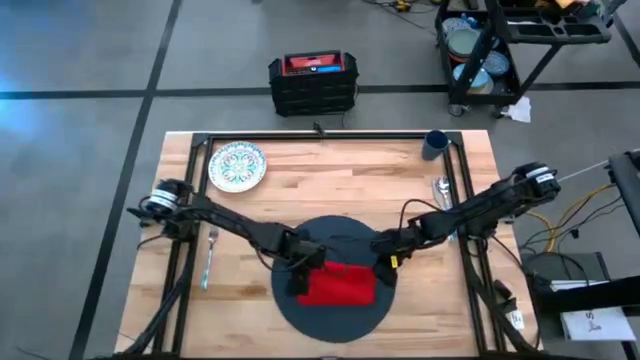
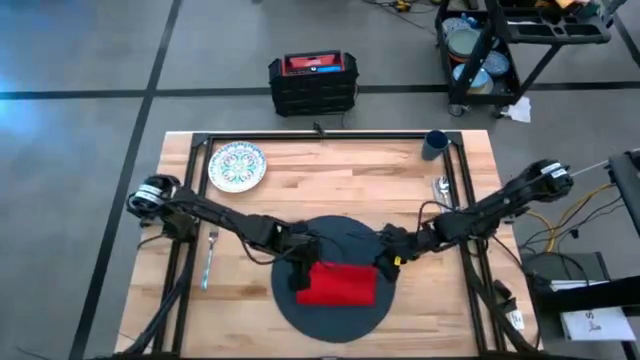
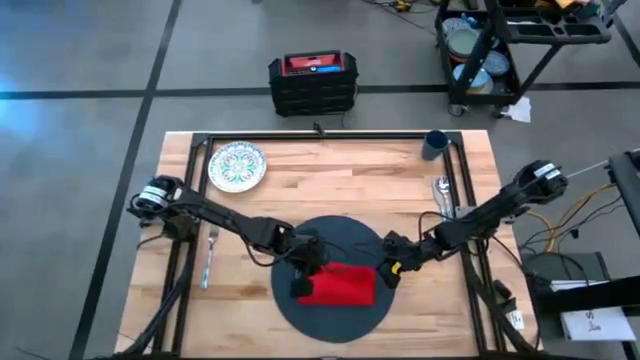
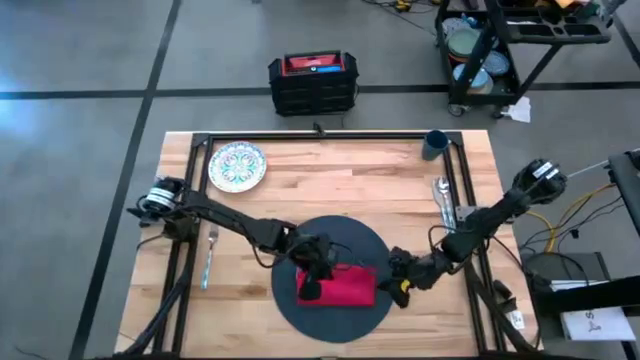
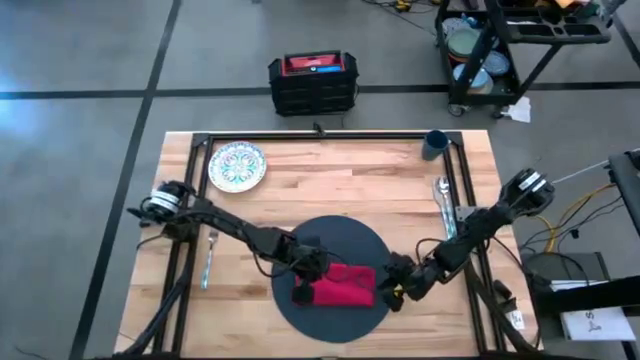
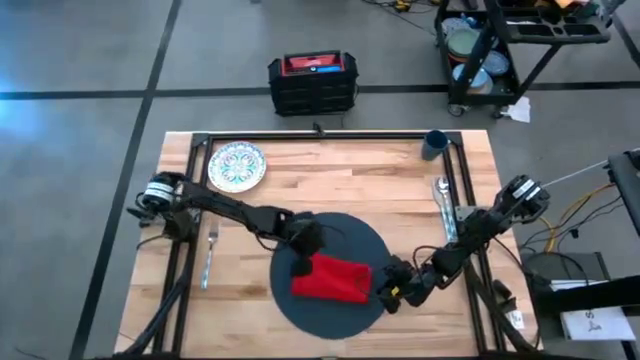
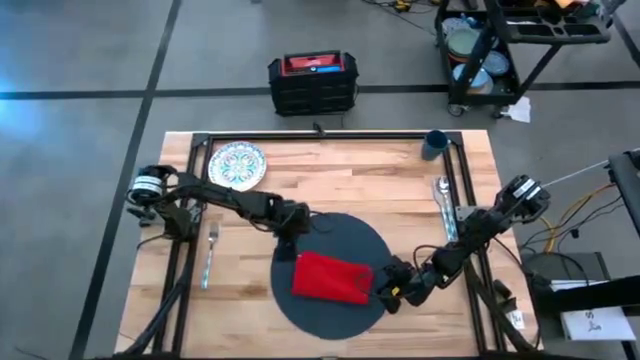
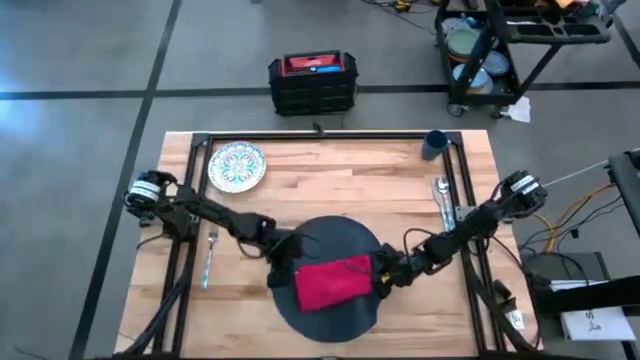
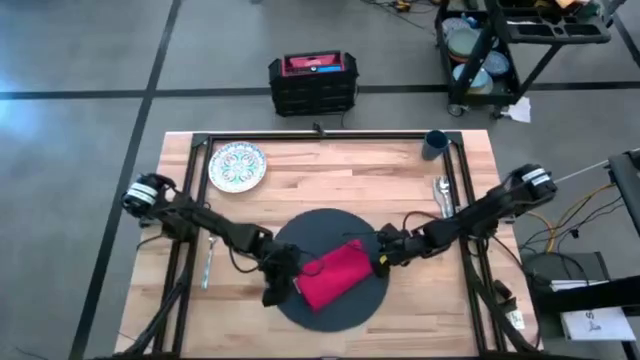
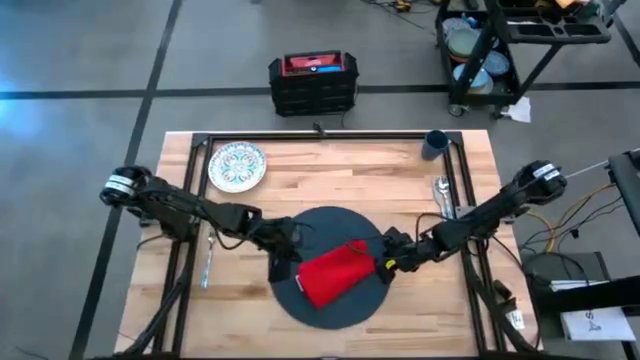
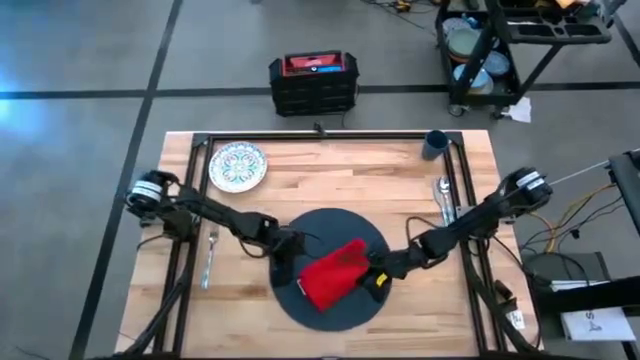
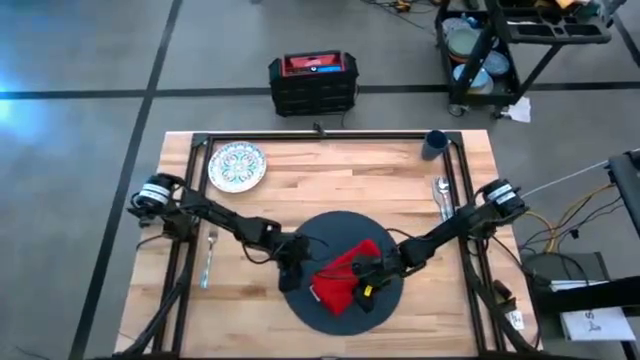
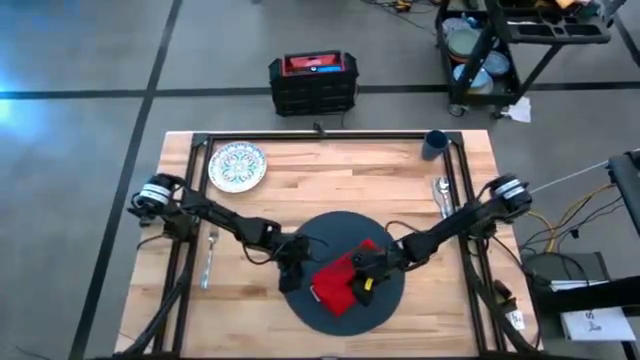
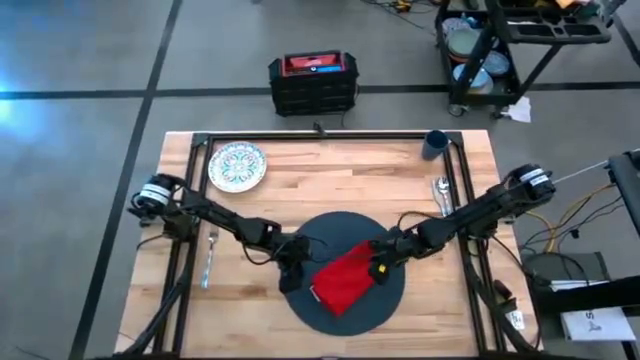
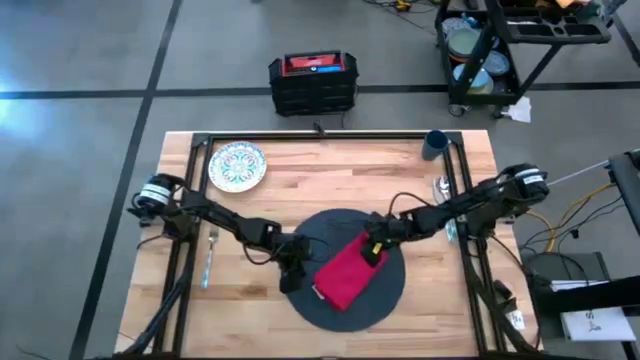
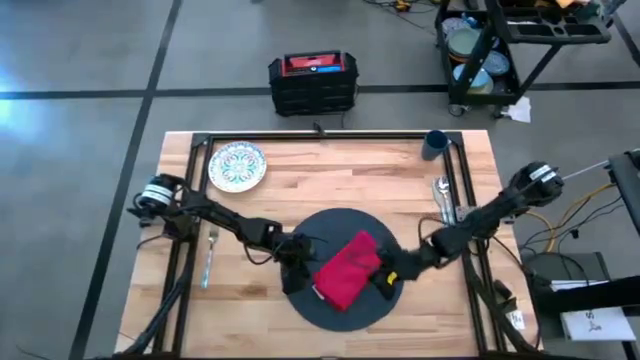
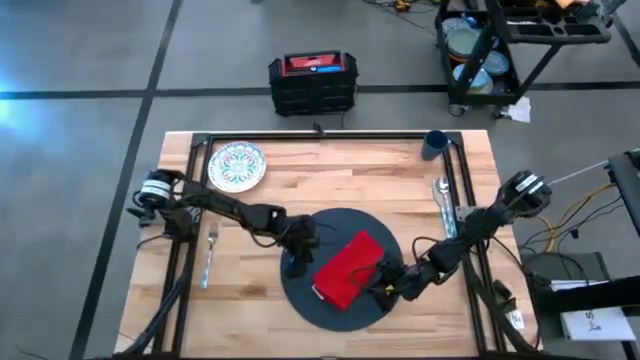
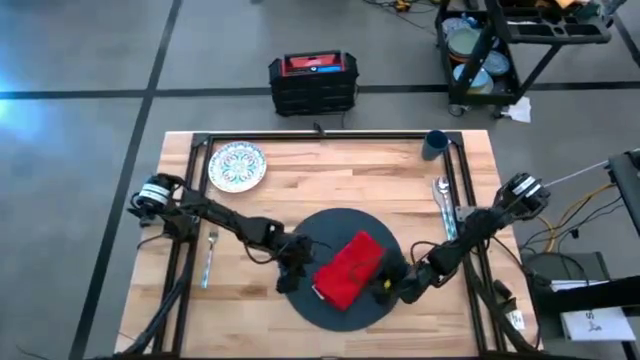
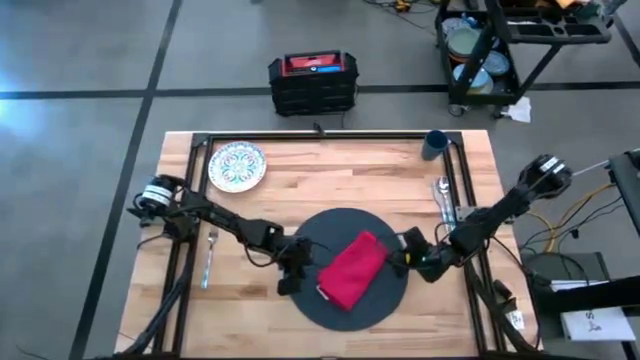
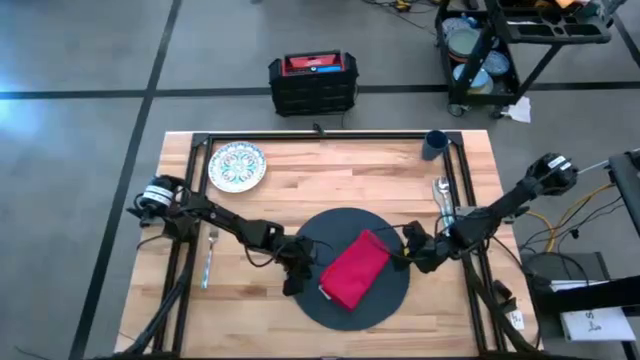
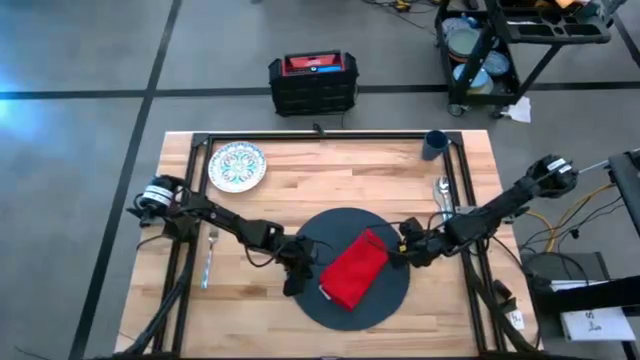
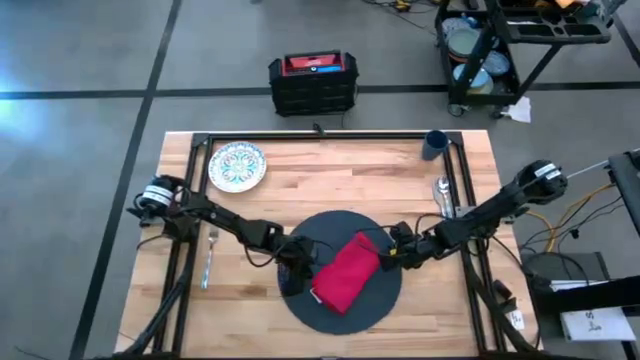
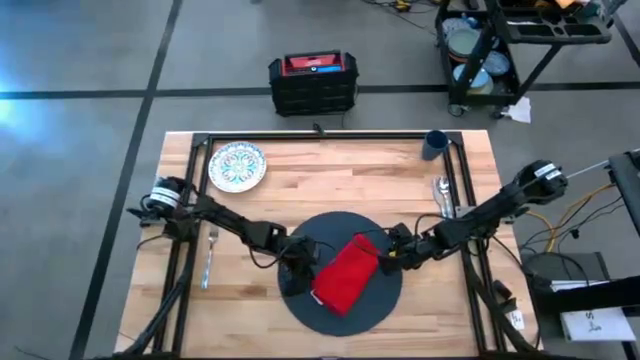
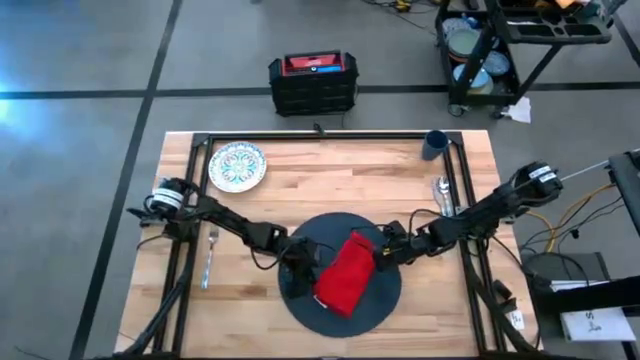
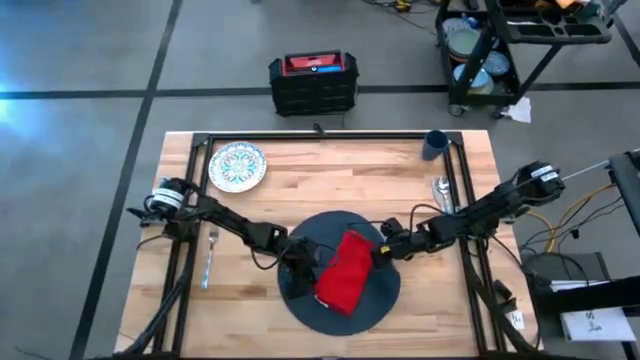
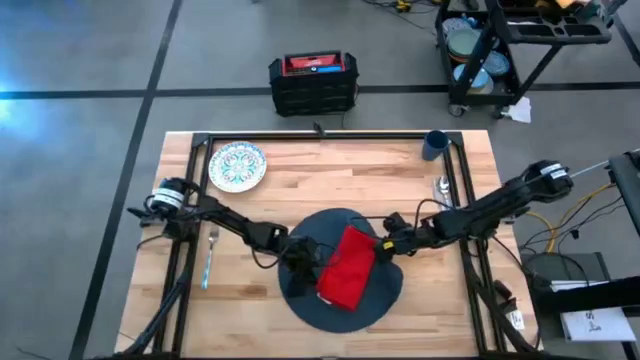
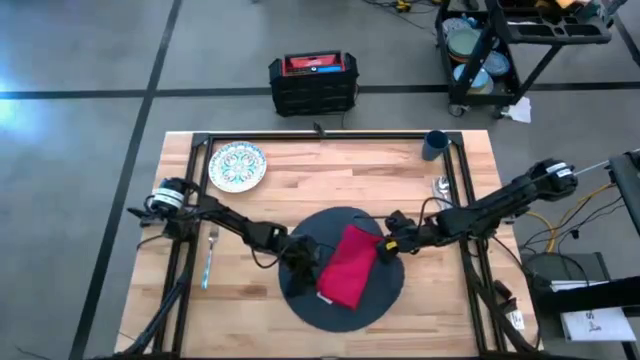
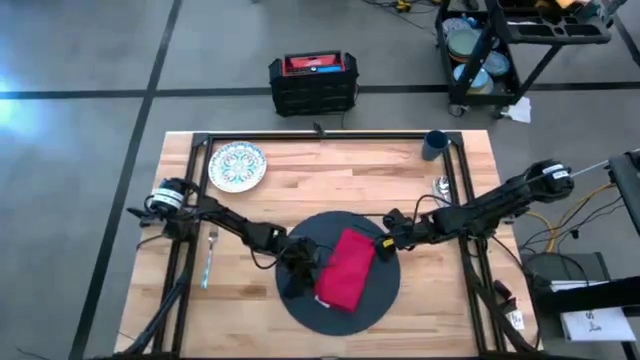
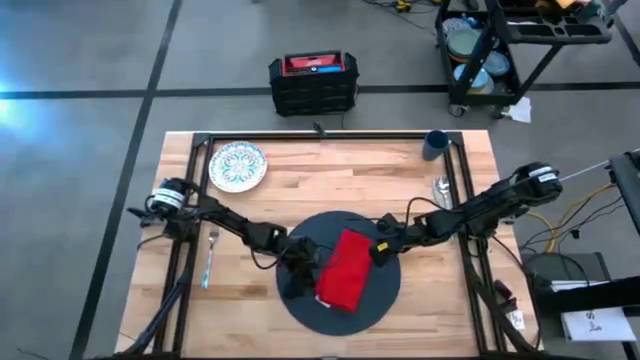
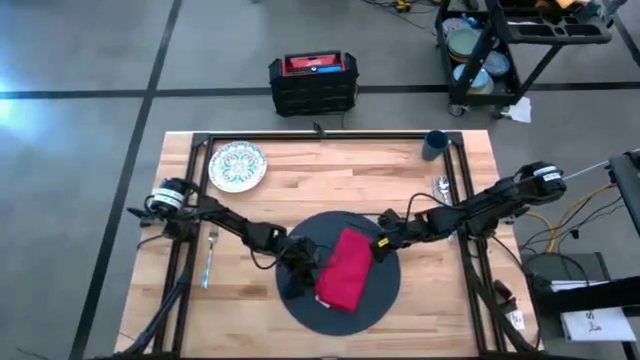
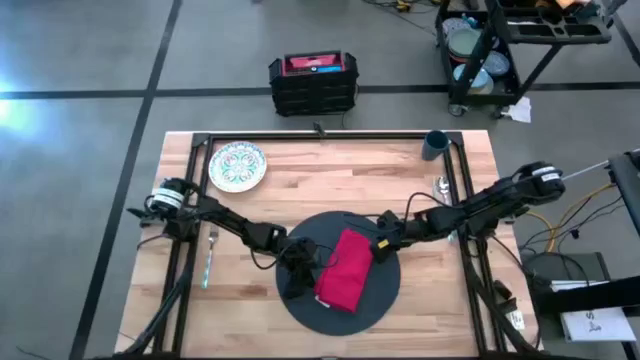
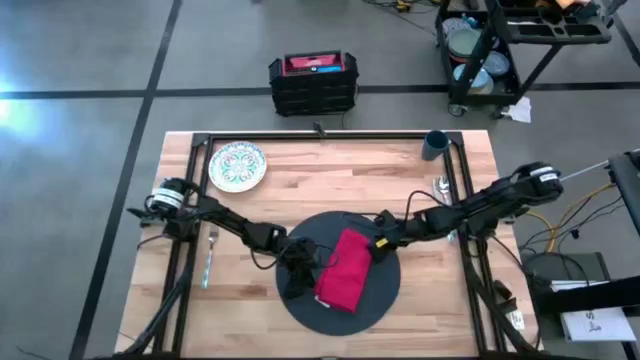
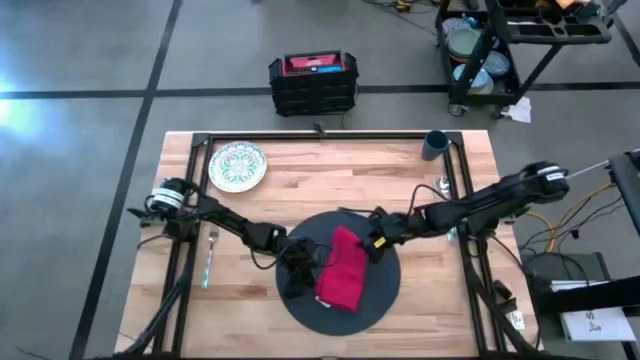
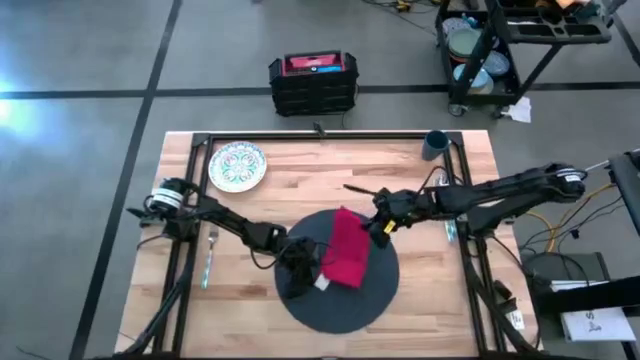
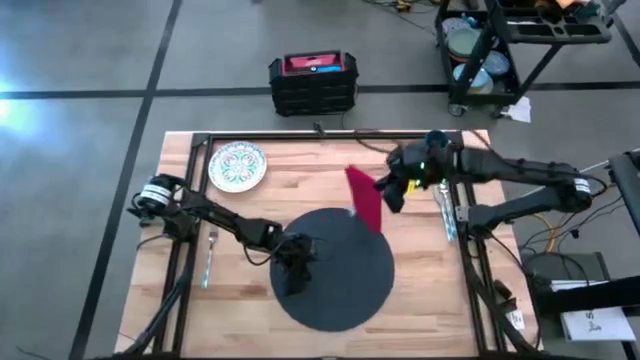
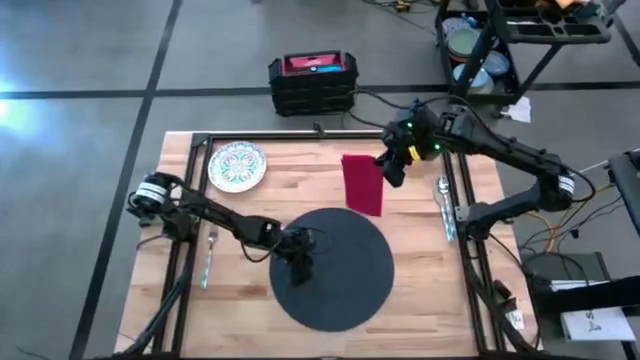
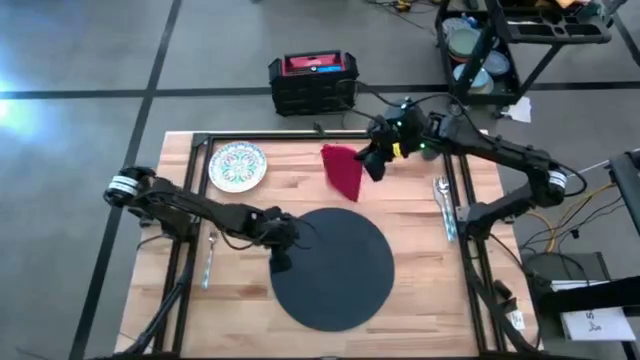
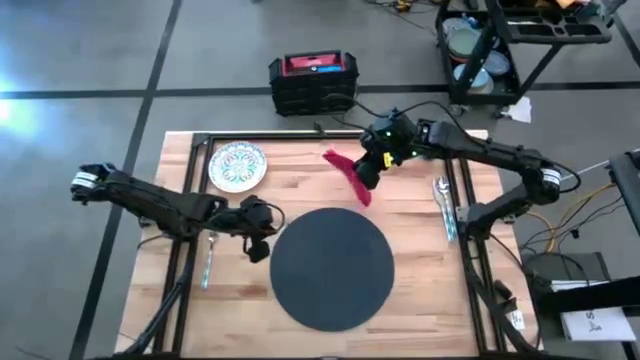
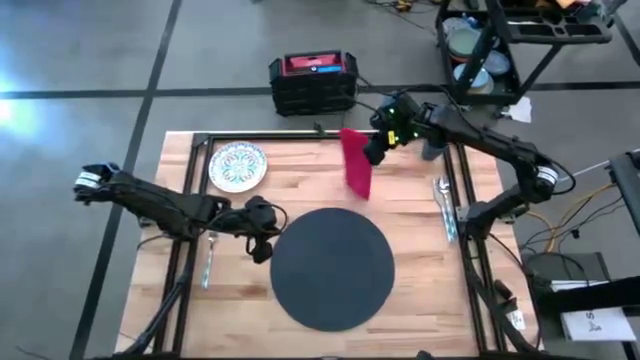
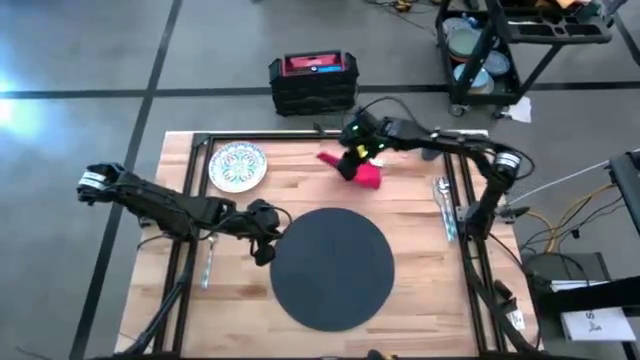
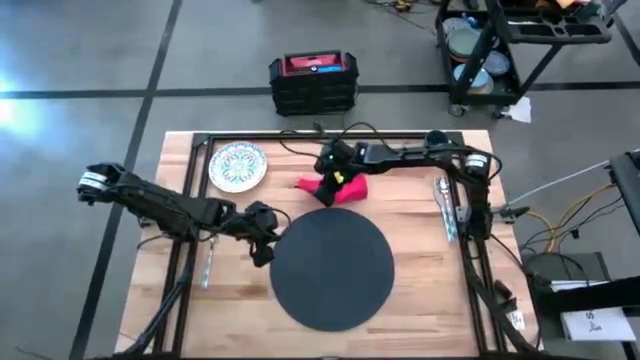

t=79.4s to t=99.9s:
Task: Set table place
Fold the red napkin on the table
